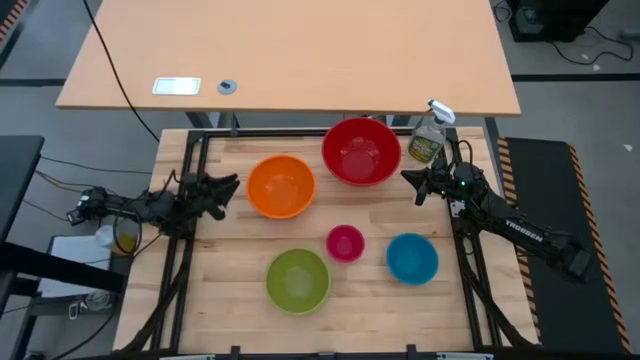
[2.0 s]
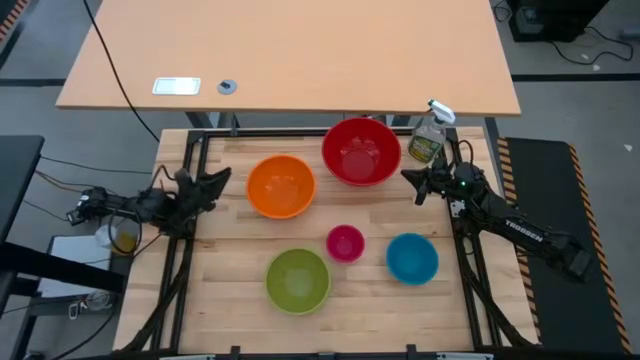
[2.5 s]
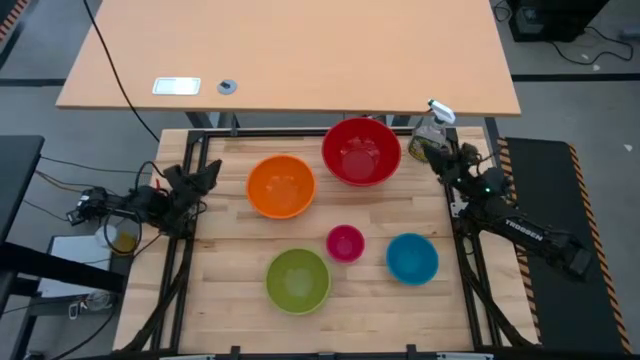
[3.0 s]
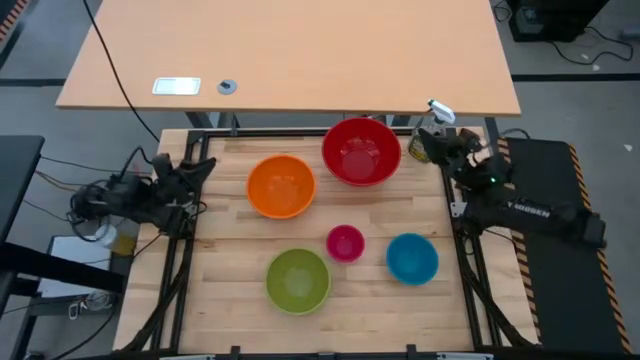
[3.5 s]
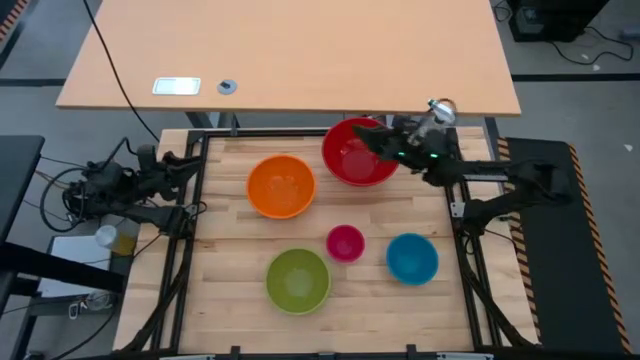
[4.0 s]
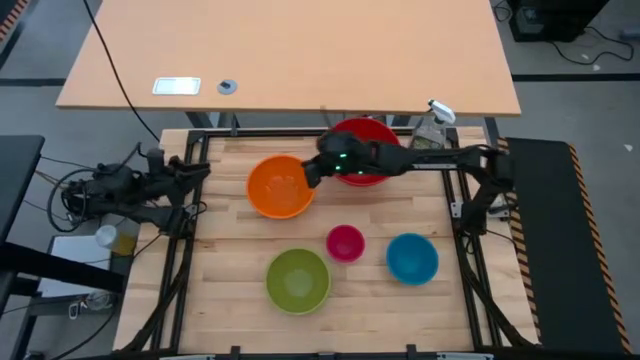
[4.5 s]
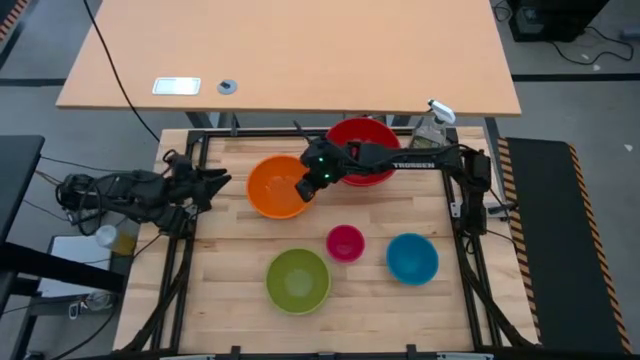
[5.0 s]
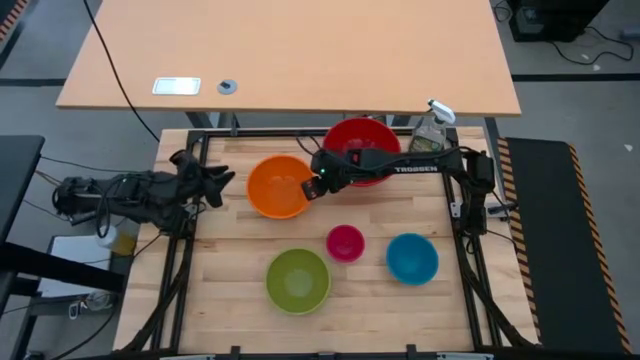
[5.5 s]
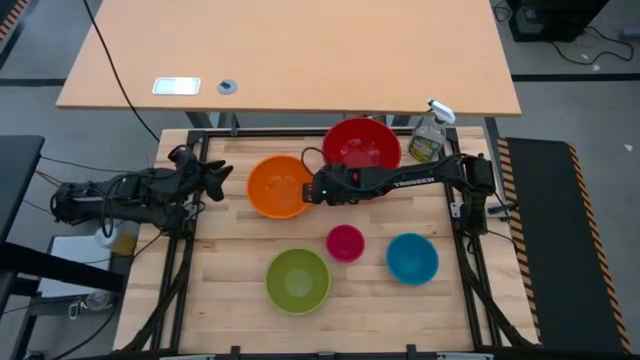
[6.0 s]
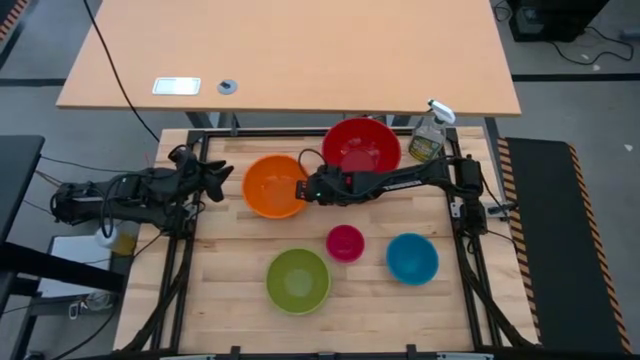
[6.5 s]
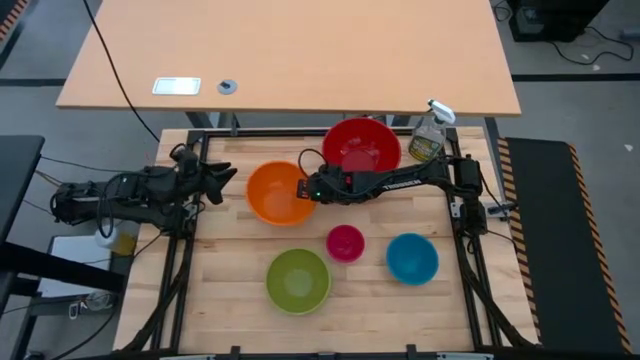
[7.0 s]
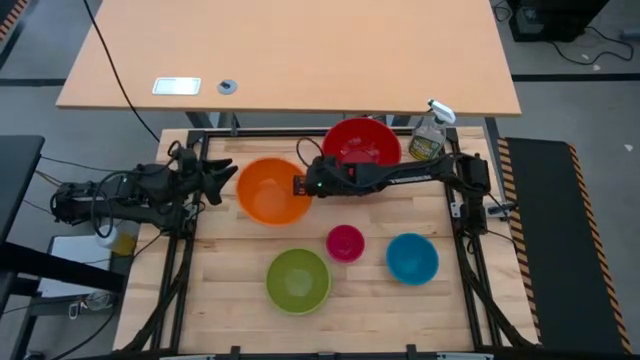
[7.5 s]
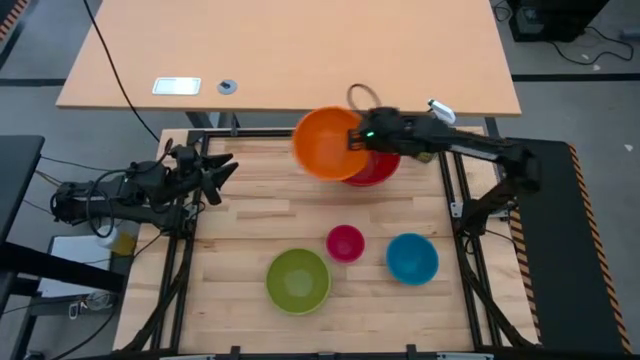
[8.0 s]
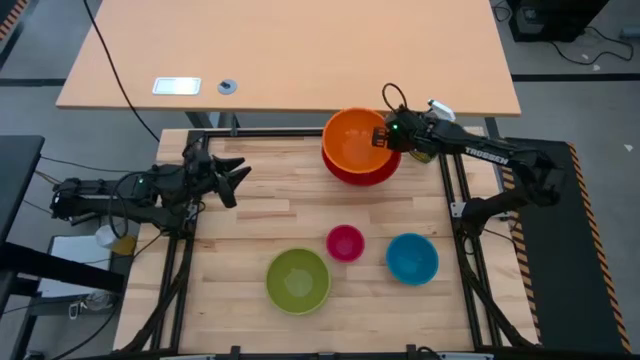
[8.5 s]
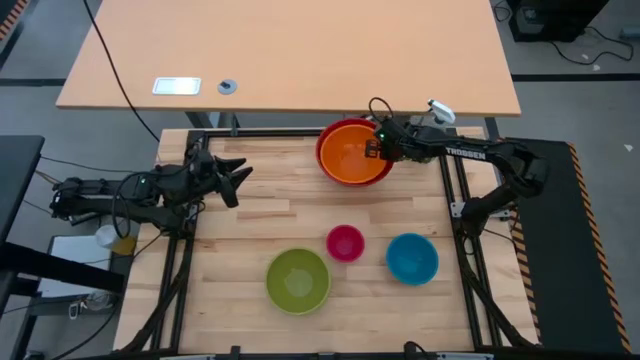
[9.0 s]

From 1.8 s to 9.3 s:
Stack the orange bowl on top of the red bowl

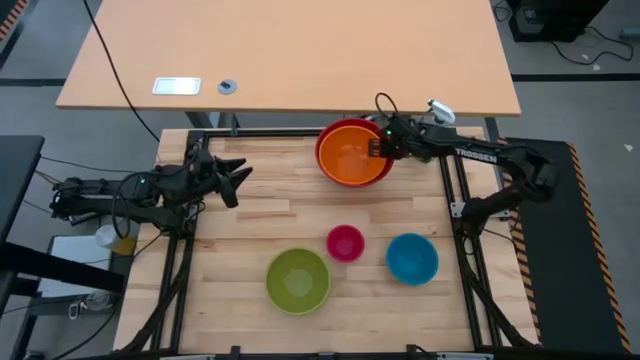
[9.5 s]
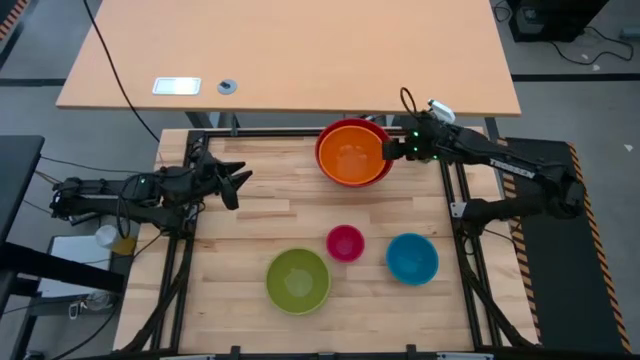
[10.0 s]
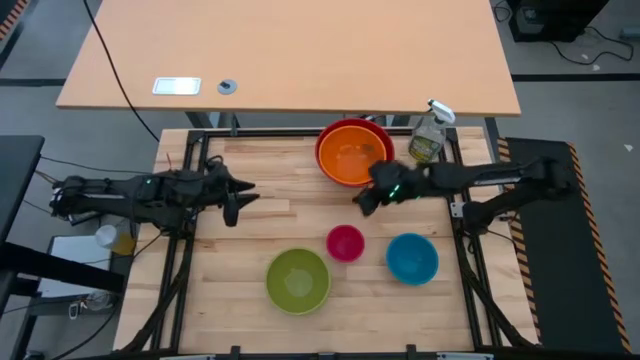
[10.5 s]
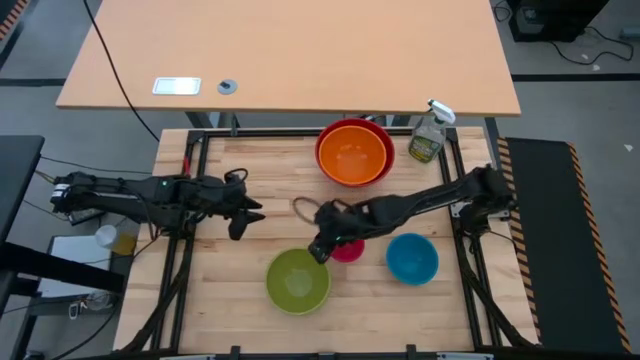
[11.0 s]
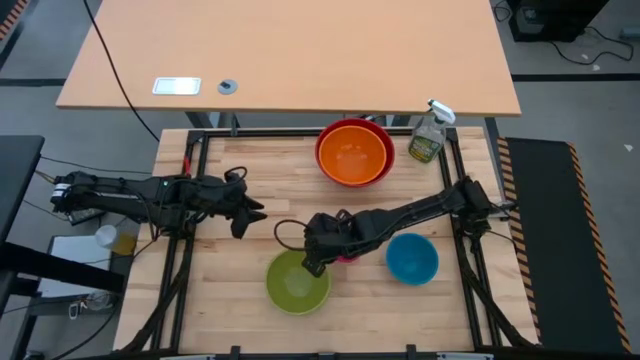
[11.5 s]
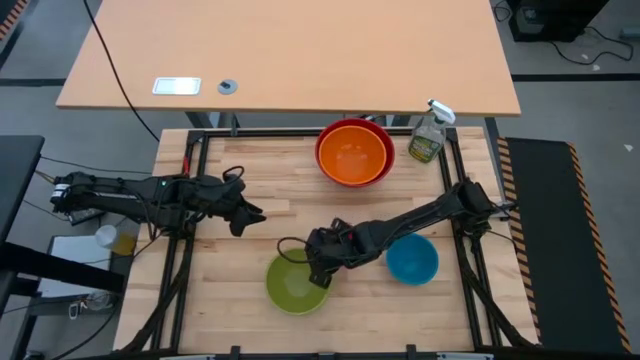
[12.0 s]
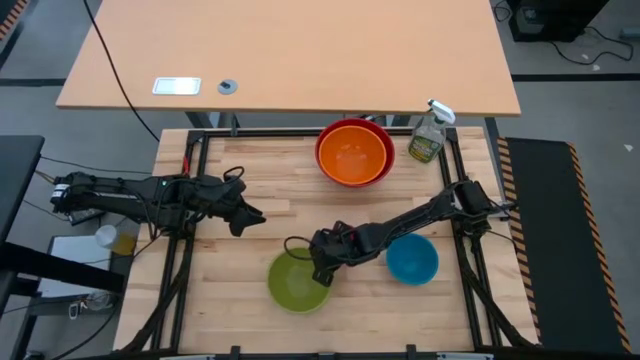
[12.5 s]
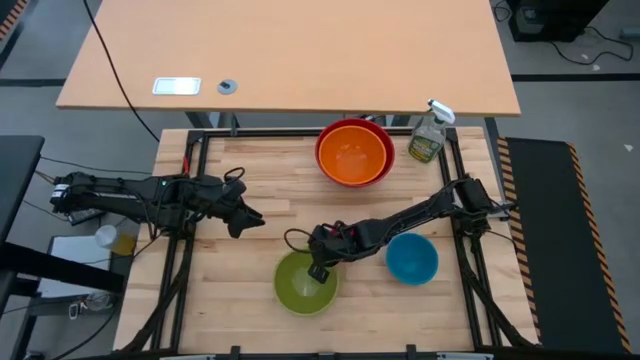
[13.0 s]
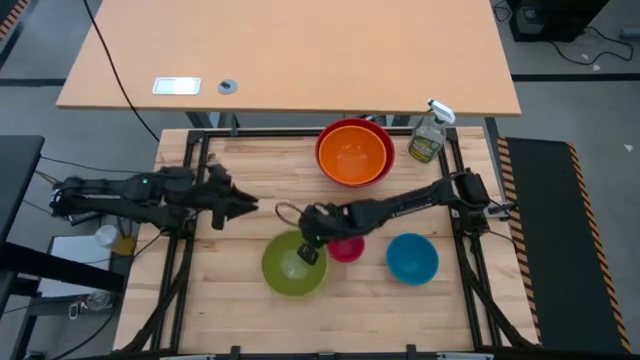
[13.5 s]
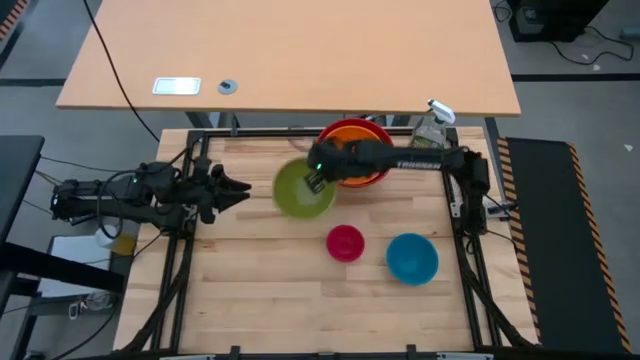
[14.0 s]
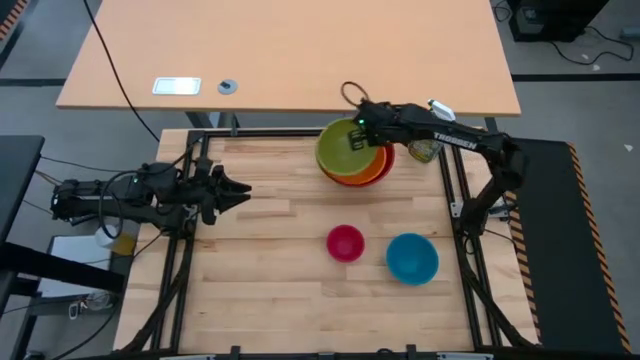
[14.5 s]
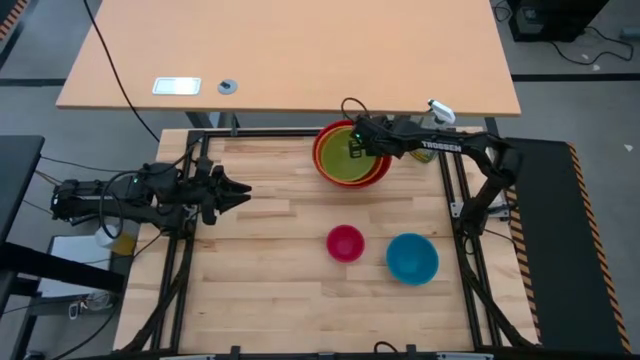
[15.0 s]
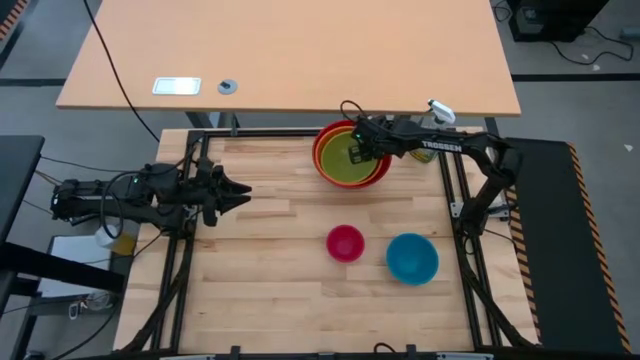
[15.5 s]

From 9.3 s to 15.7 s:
Stack the green bowl on top of the orange bowls
